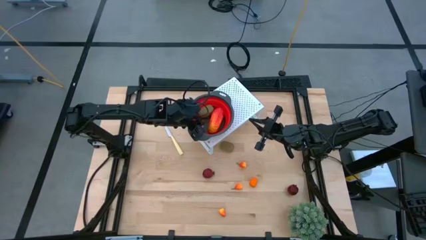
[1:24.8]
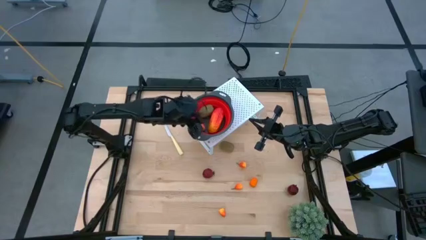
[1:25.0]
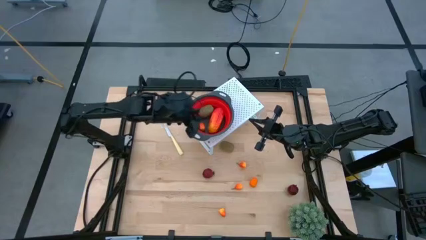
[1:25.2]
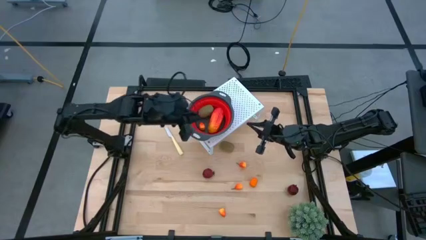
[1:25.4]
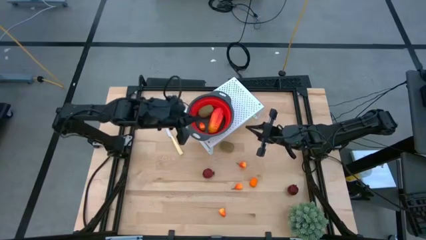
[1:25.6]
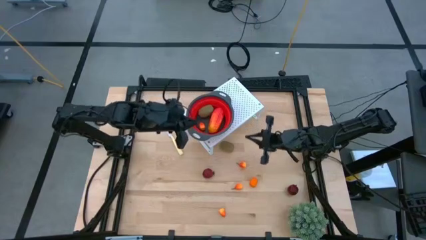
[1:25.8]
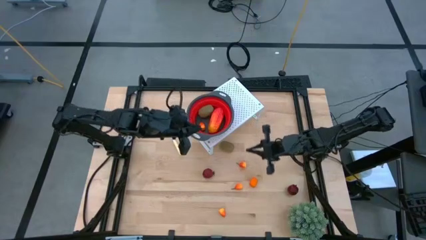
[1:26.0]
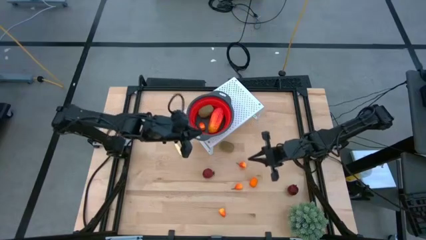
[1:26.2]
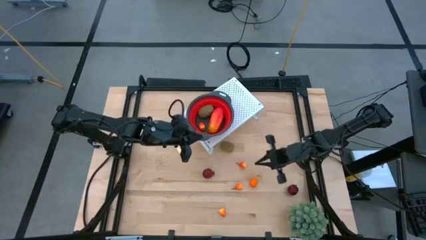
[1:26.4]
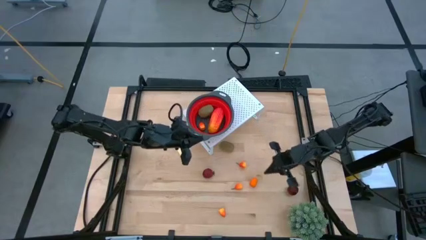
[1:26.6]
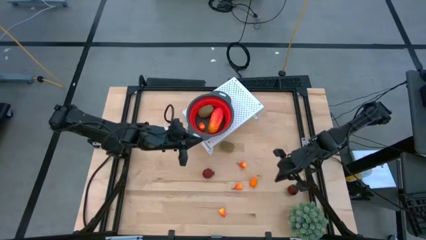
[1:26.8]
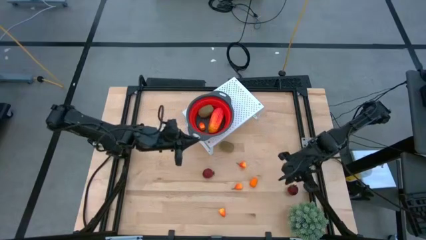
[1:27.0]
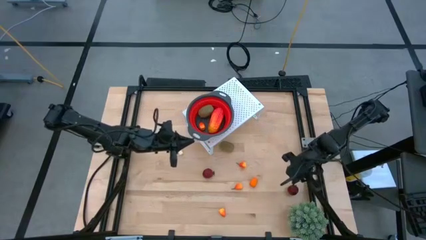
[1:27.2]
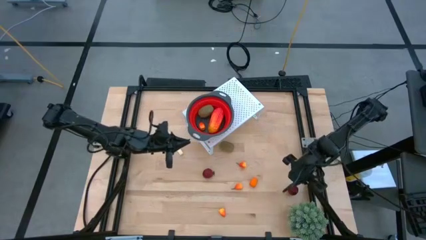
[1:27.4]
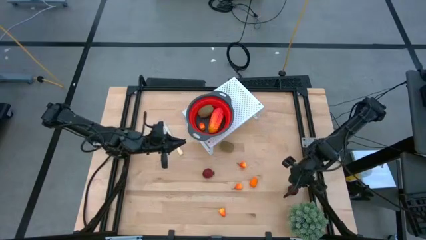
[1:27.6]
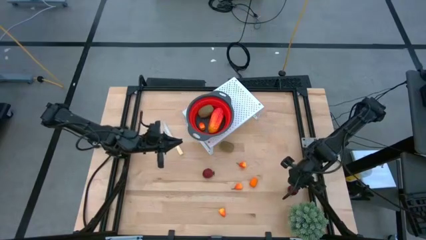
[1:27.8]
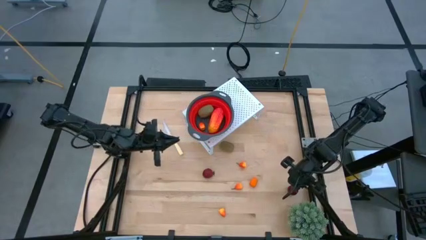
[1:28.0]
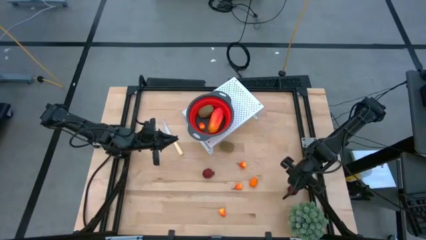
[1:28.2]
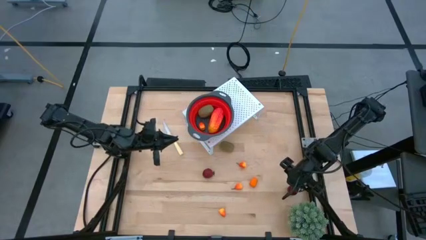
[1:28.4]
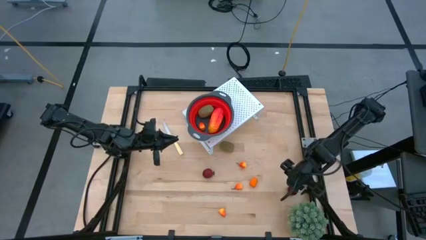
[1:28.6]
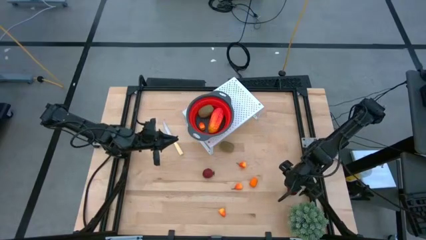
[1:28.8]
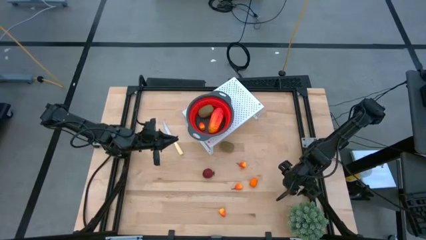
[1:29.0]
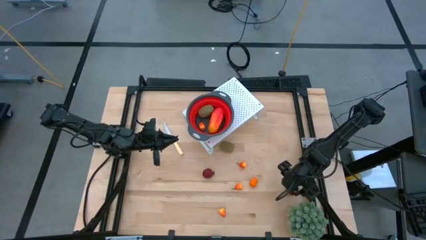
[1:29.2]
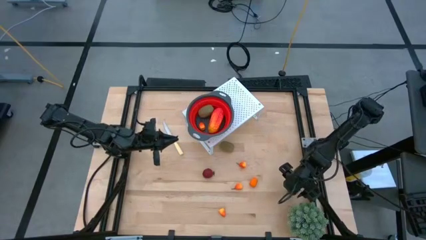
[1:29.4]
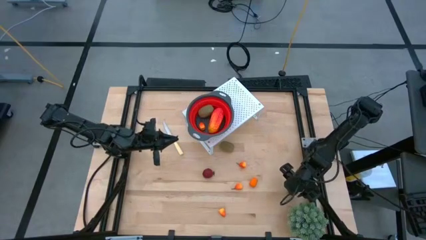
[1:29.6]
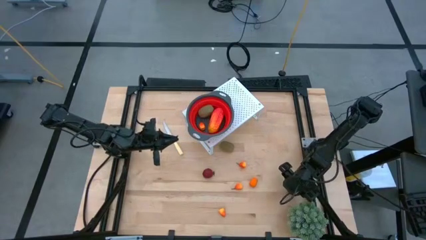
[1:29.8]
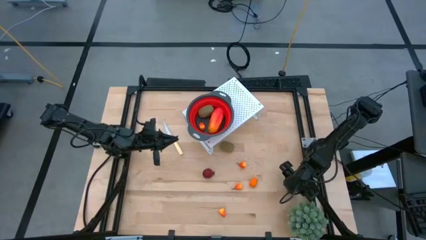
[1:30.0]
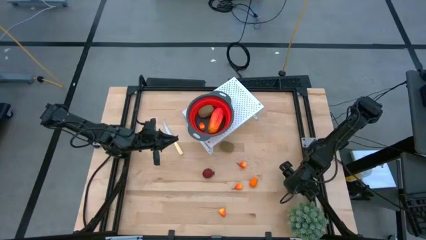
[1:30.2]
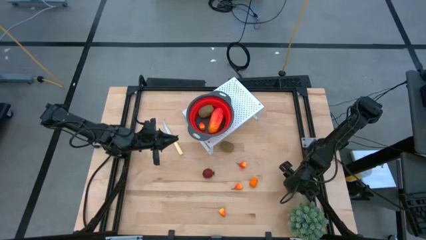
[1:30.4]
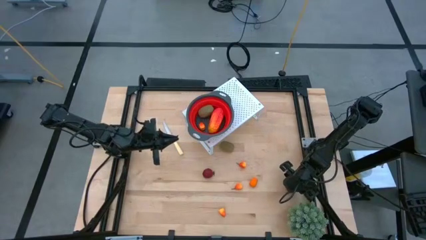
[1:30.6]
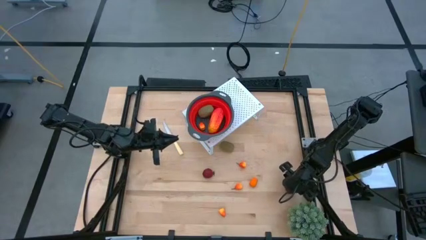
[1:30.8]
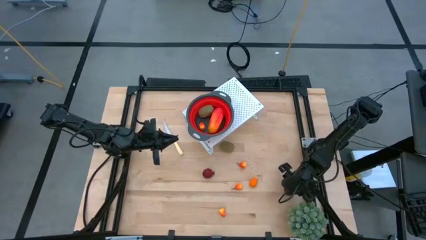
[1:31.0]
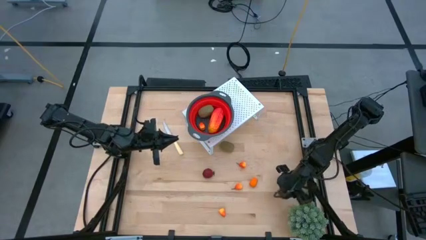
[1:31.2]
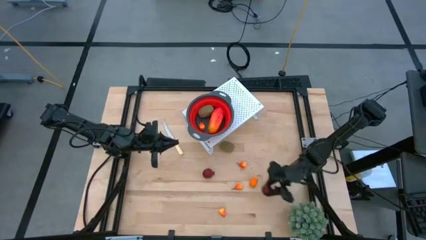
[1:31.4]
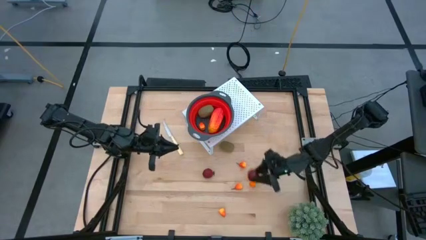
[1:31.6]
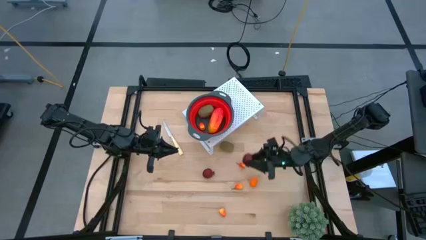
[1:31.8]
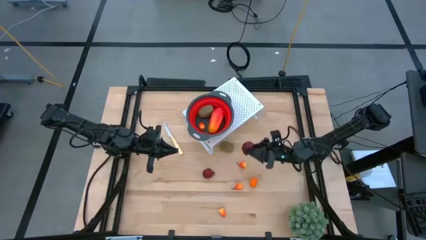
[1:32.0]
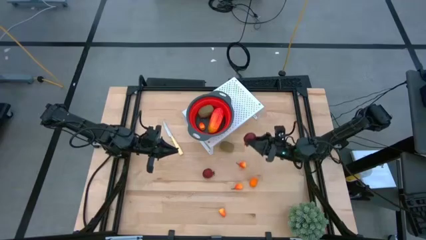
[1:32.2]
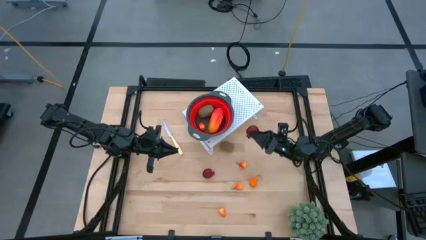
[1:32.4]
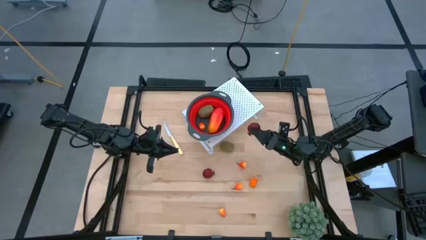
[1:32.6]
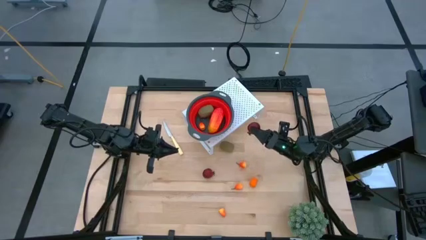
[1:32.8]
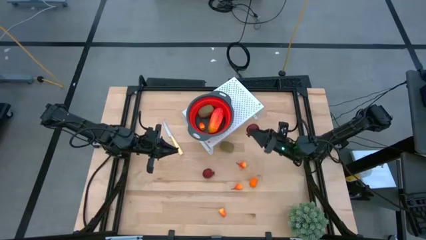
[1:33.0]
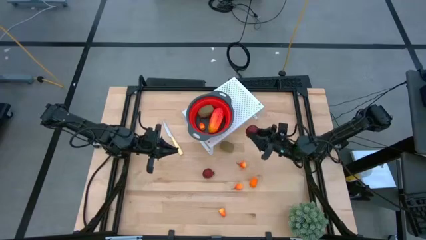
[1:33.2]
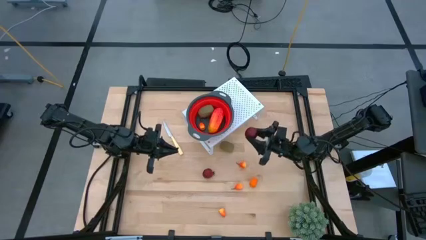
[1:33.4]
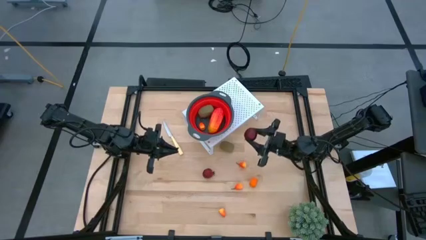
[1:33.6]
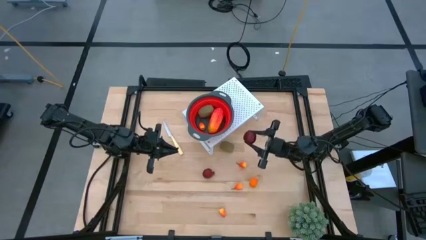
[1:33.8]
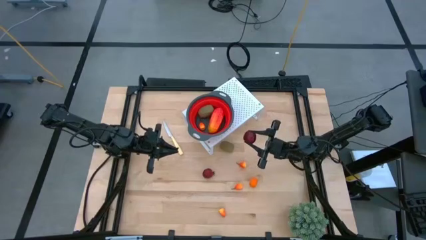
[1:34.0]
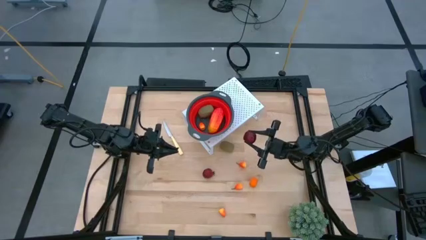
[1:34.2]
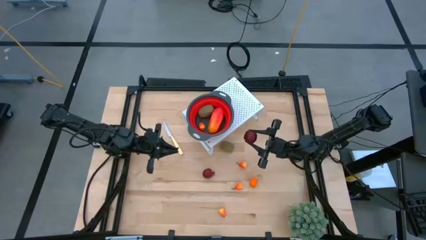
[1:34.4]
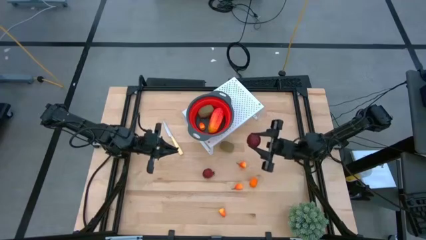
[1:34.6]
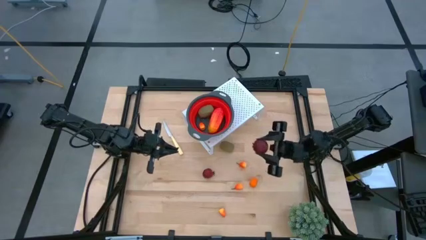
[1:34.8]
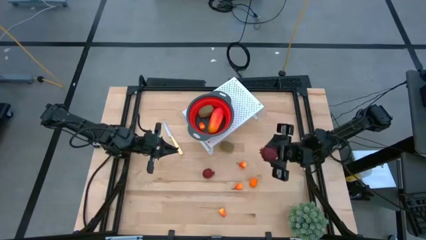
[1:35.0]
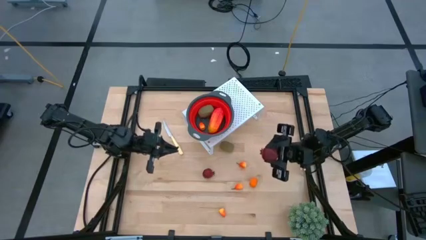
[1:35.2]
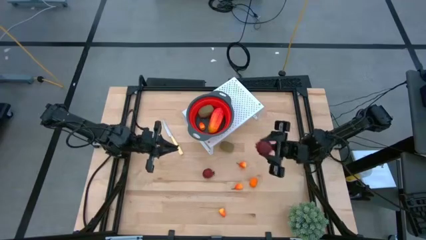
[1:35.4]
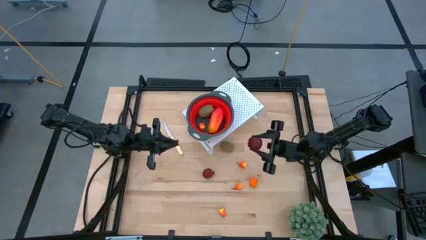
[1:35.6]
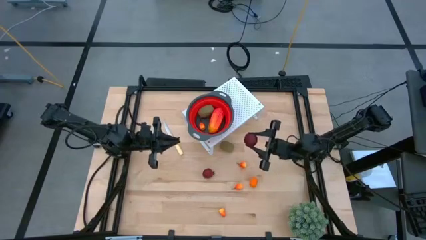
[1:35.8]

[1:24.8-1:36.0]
Task: Pick & Place Fruit
Put the pomegranate into the red strainer bowl on the shelf
